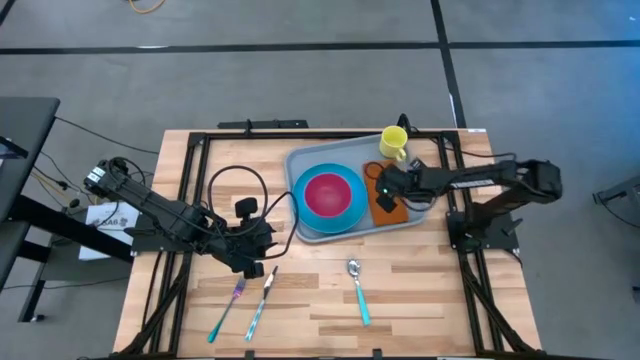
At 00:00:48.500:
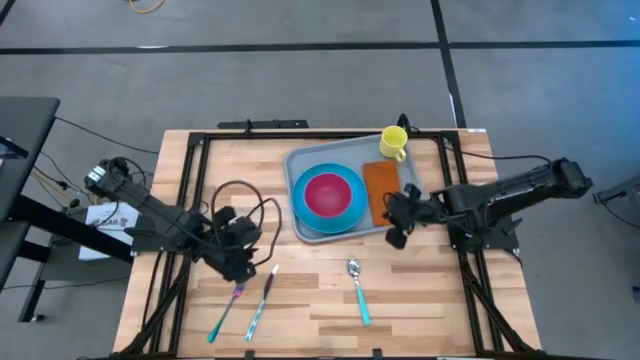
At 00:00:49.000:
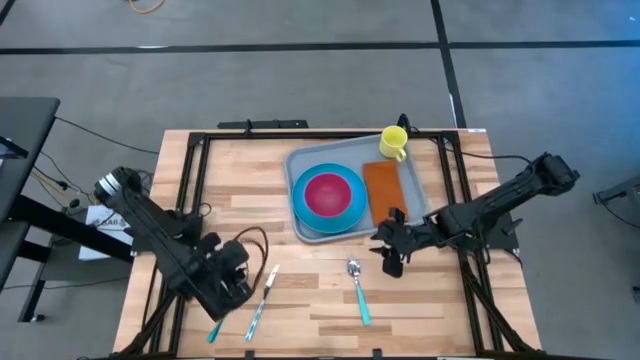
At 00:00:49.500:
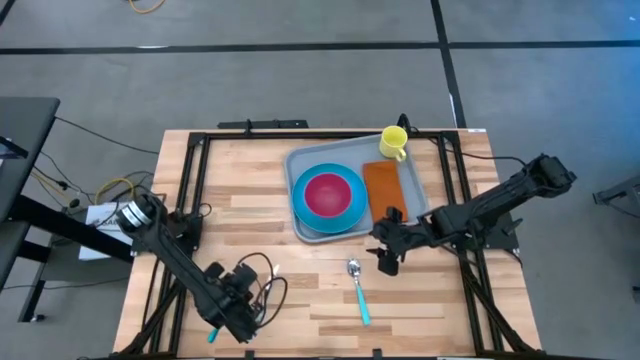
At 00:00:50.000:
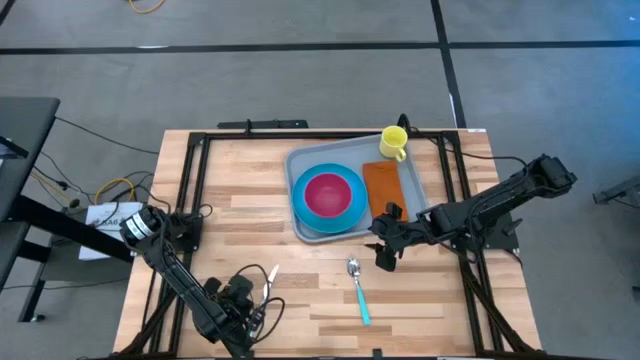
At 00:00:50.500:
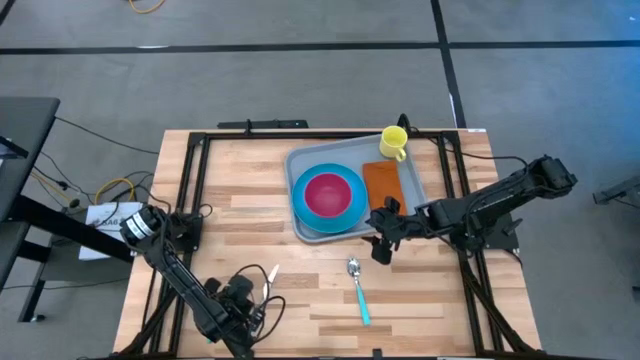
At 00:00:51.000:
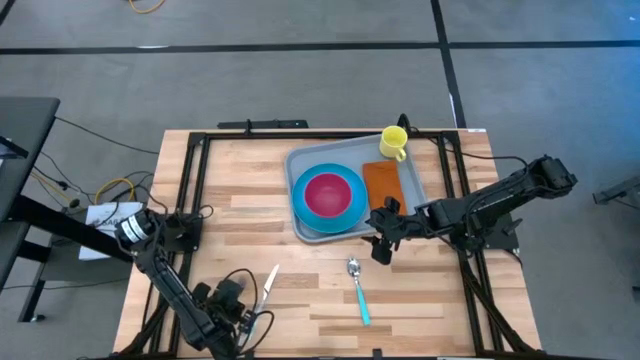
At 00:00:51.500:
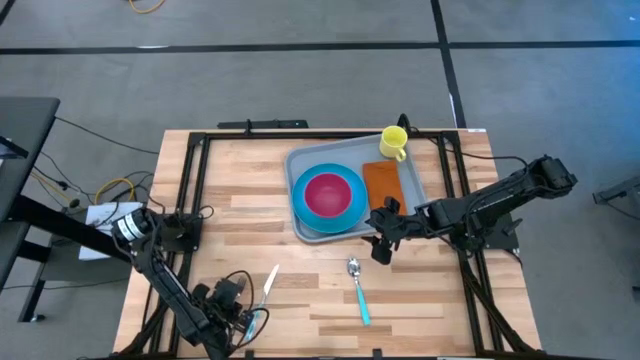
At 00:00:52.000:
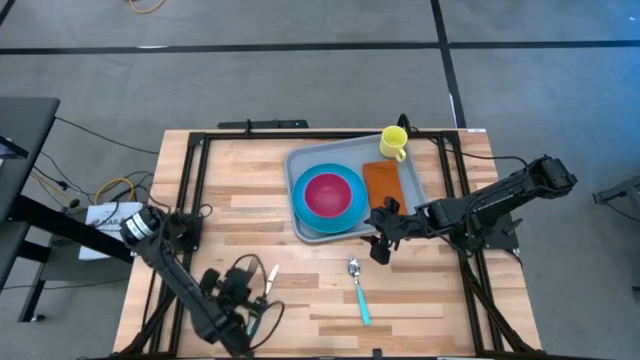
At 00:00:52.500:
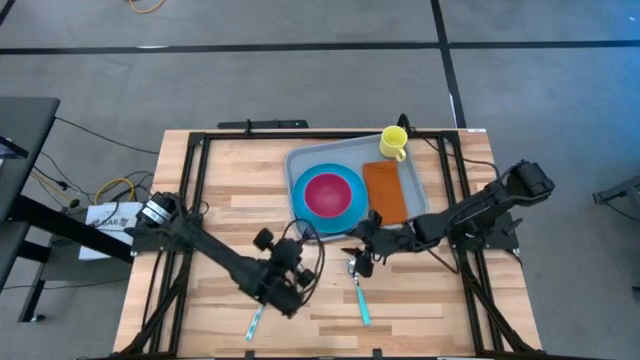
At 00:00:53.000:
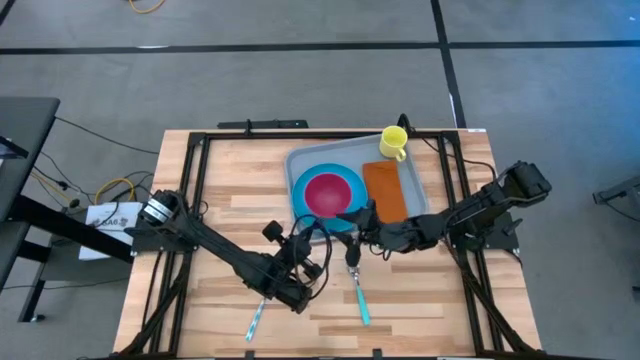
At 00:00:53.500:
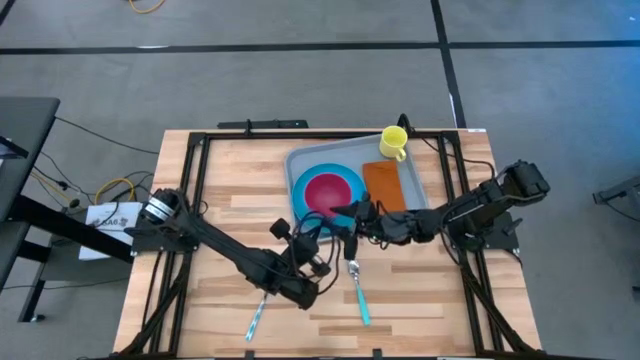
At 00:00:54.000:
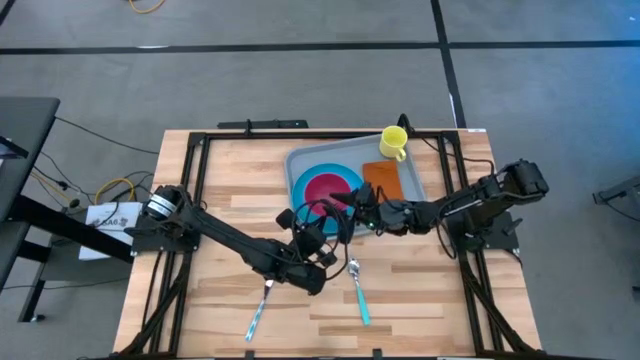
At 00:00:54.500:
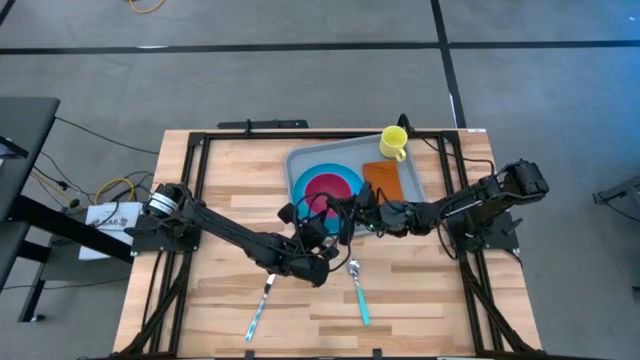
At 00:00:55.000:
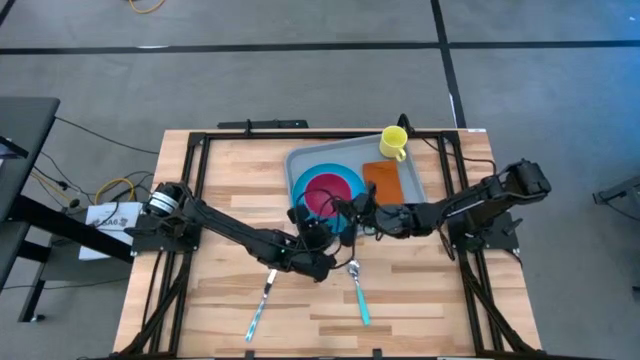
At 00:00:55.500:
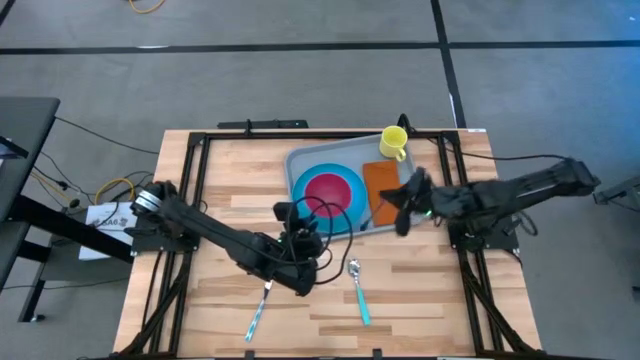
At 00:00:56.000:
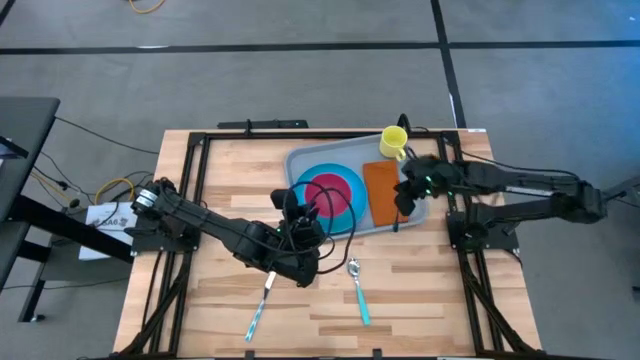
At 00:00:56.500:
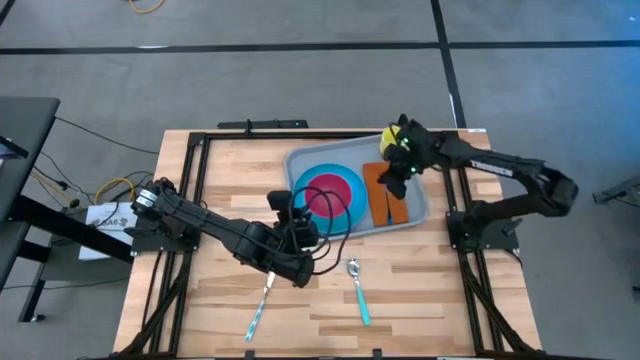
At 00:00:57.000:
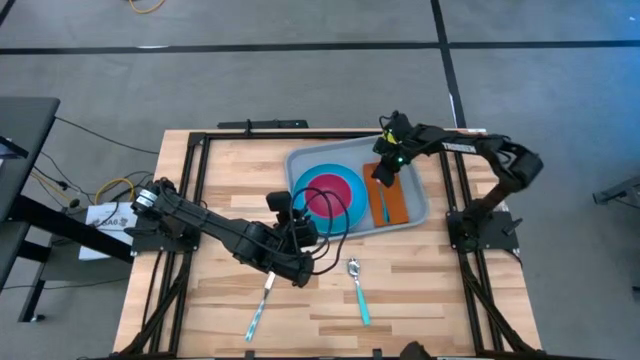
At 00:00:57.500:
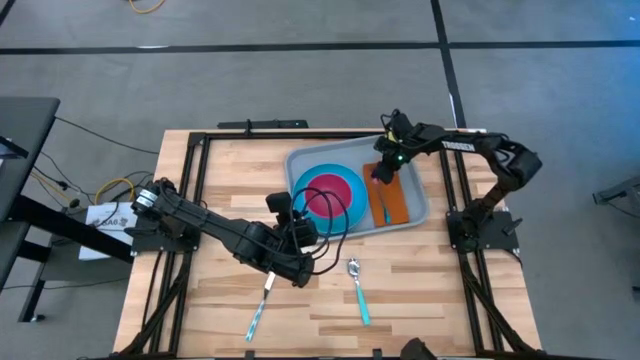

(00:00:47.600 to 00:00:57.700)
Task: Set up tray
Put the purple fork on top of the orange napkin

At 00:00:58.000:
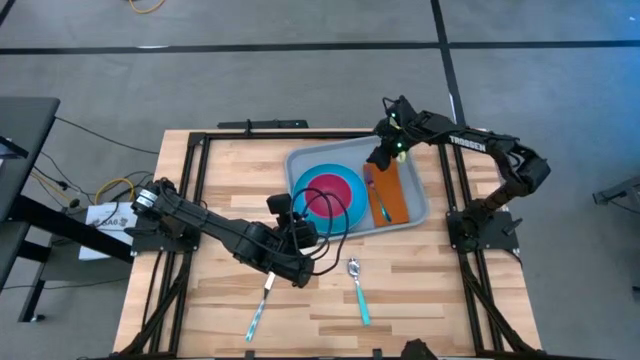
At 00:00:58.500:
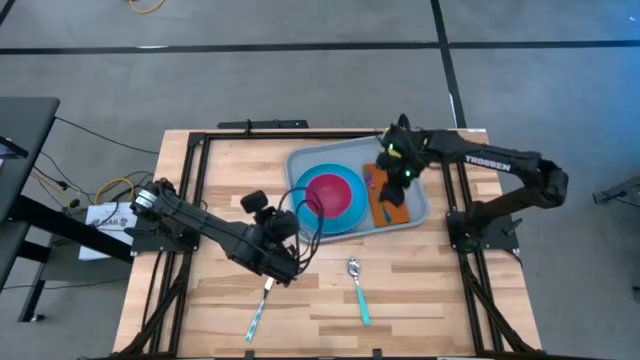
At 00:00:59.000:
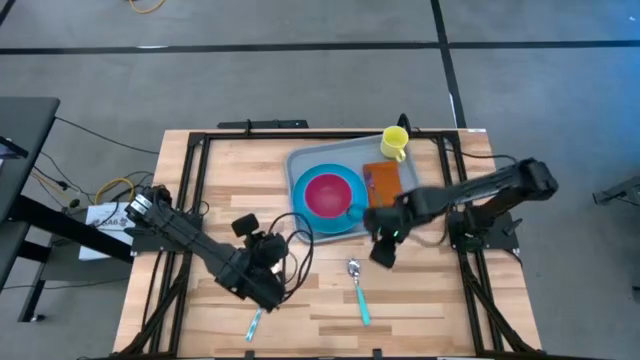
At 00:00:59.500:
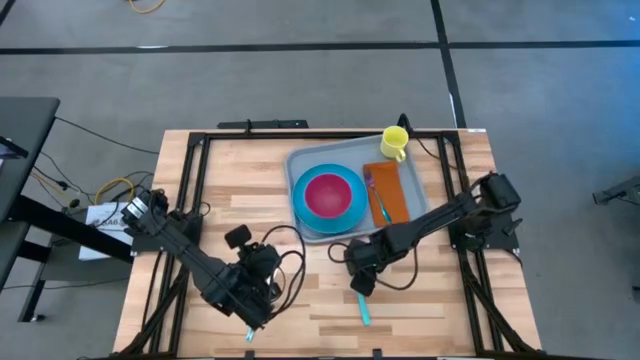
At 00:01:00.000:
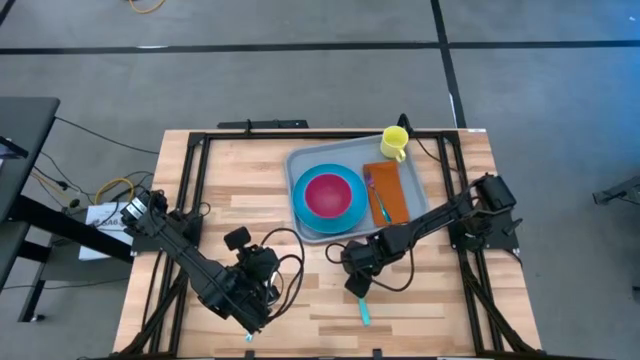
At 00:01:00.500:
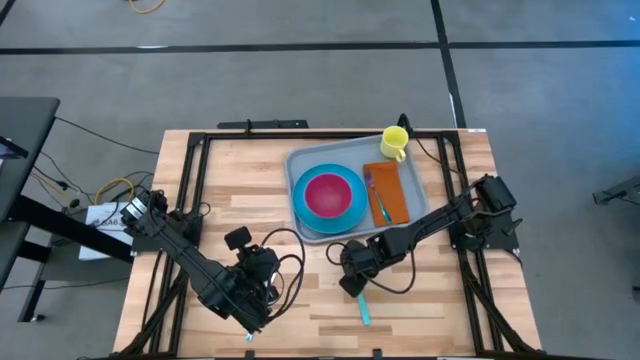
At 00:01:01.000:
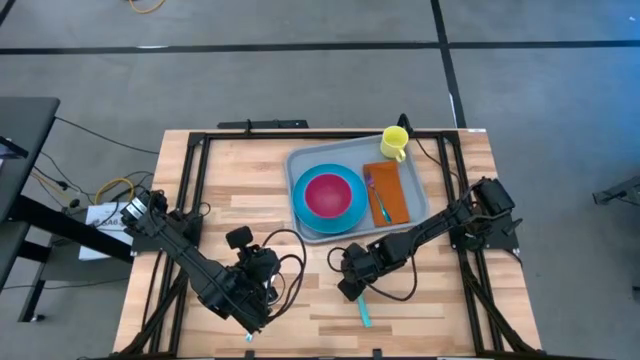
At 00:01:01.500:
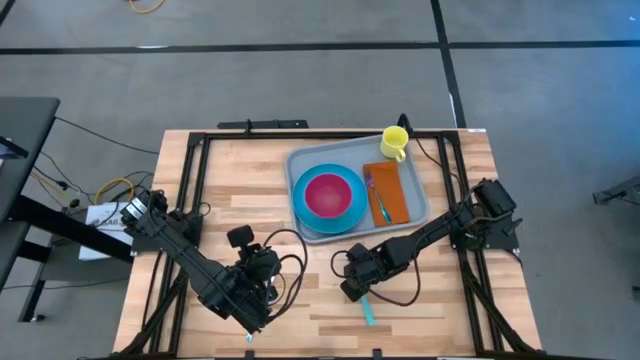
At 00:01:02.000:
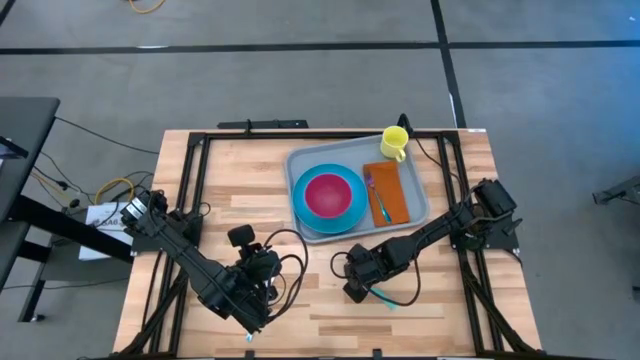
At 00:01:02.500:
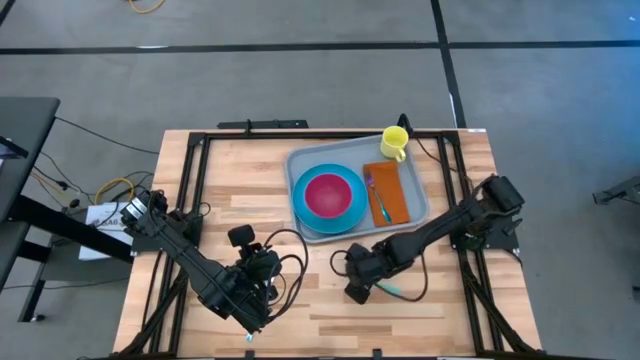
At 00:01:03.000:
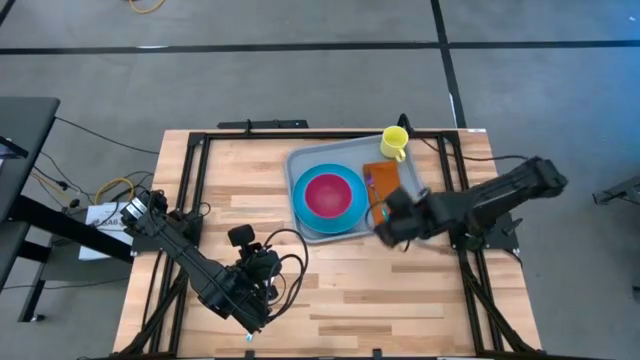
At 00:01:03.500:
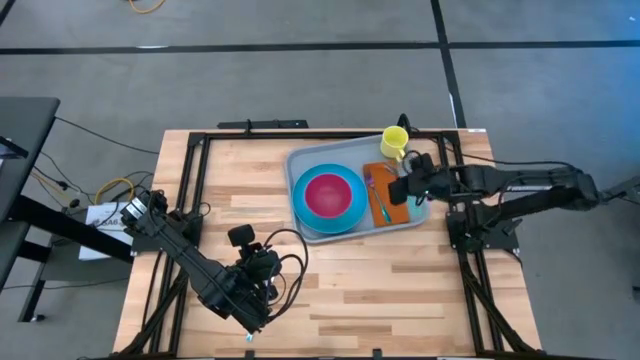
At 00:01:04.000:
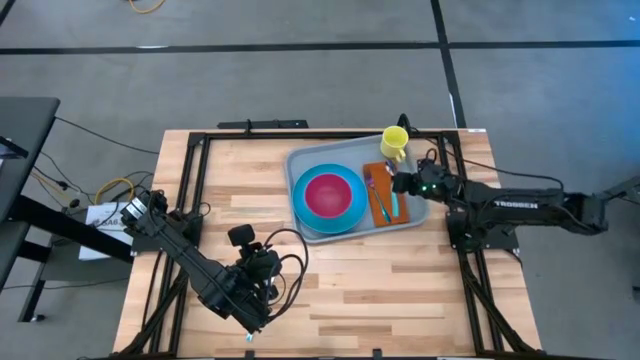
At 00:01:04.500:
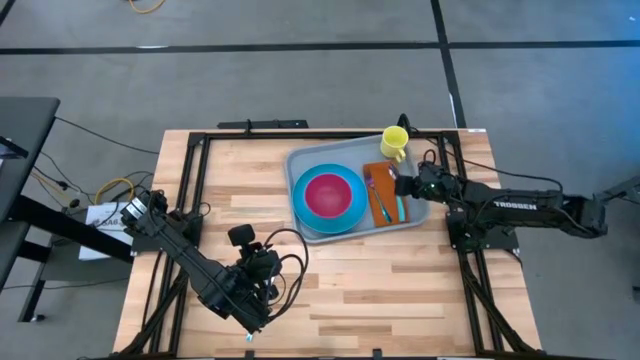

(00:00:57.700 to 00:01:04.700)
Put the green spoon on top of the orange napkin to the right of the purple fork

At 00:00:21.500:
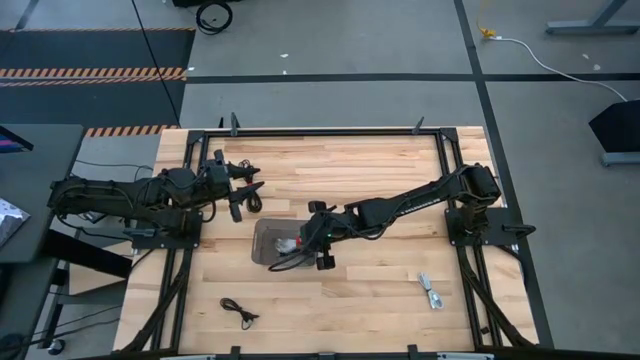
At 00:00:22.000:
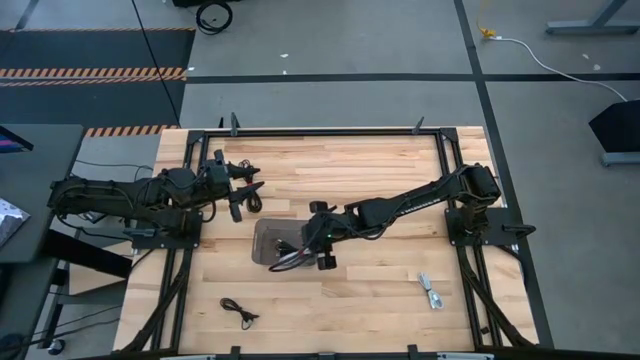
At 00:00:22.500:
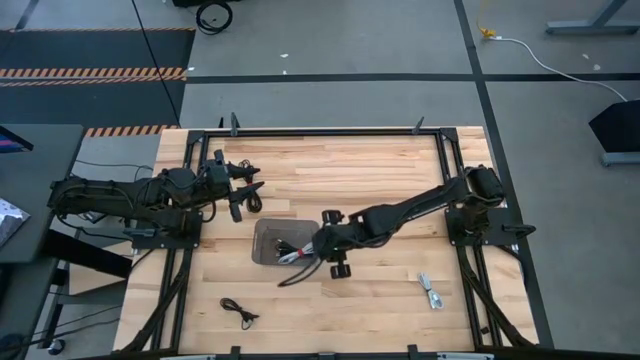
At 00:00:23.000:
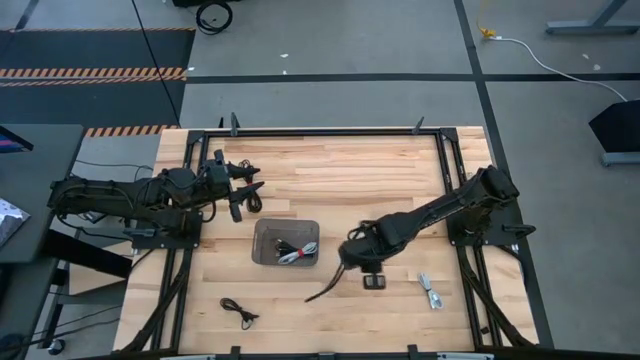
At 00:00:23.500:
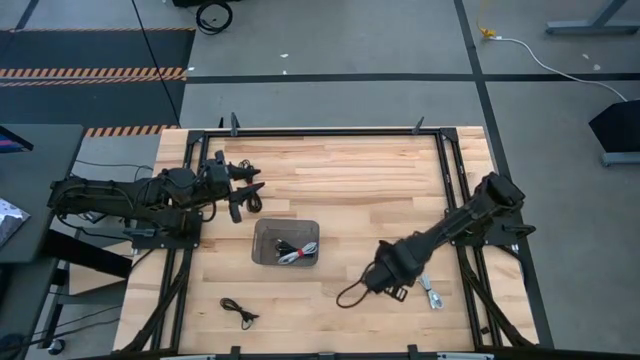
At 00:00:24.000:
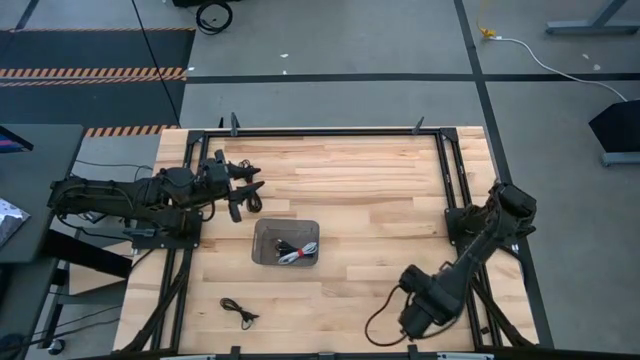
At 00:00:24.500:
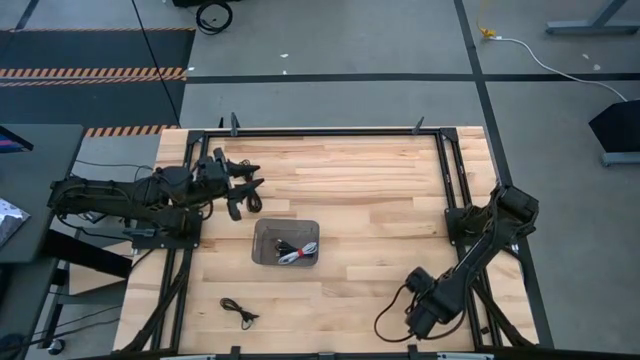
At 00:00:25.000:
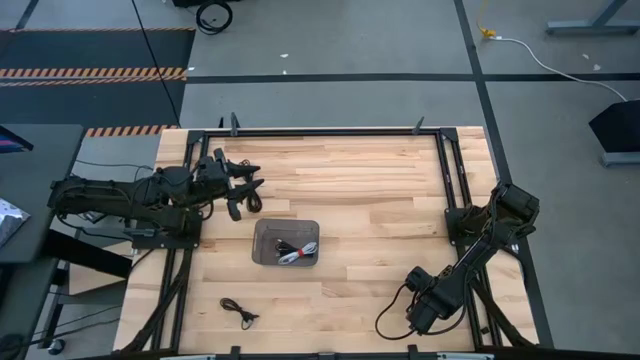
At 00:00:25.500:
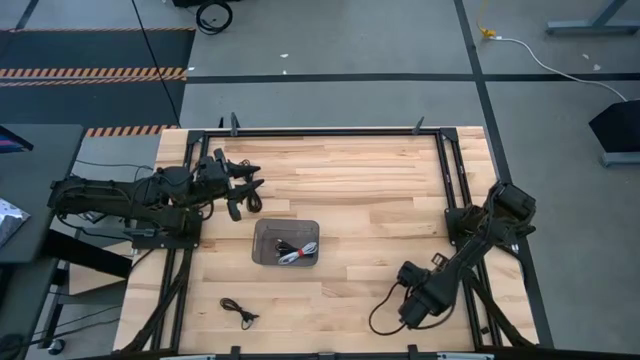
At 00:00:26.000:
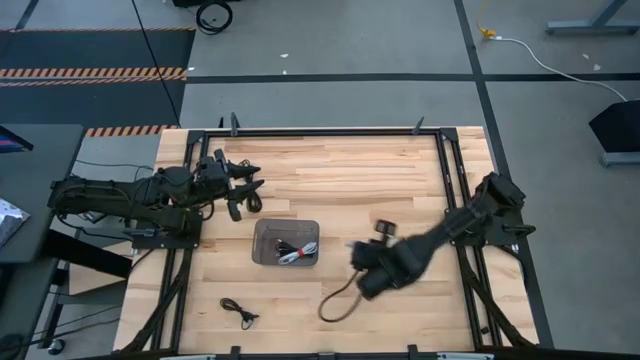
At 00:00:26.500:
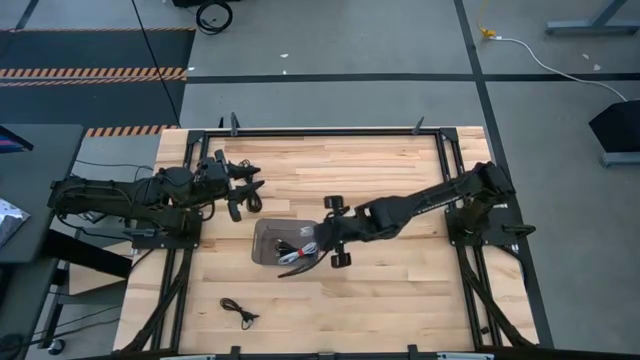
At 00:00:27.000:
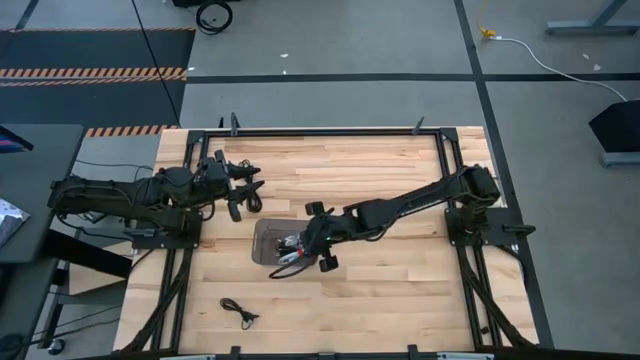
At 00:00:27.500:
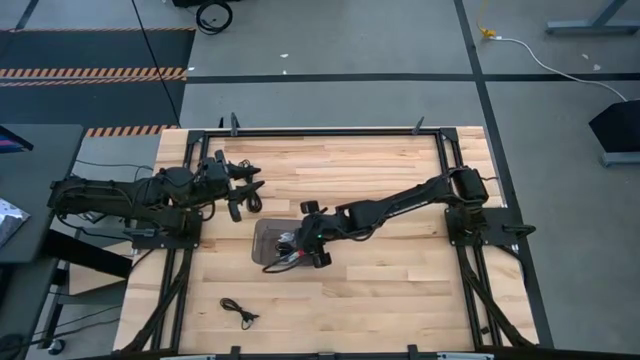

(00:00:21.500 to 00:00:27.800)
Task: Pick and place USB-C Cables
Put the white USB cable into the black bin
